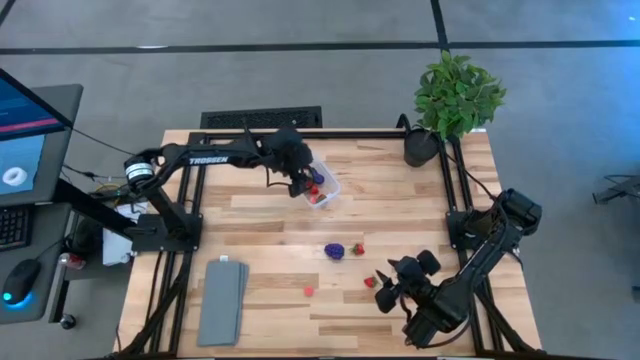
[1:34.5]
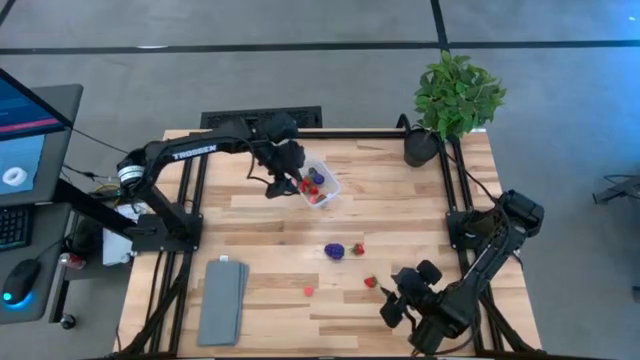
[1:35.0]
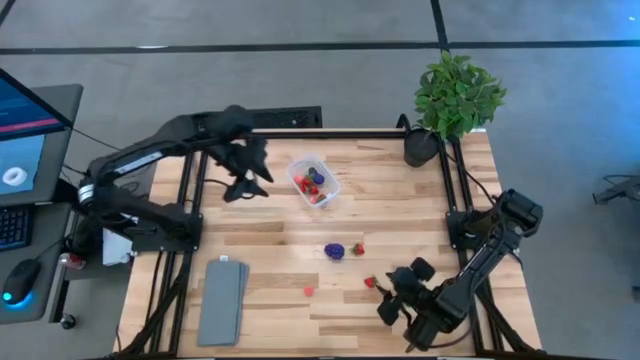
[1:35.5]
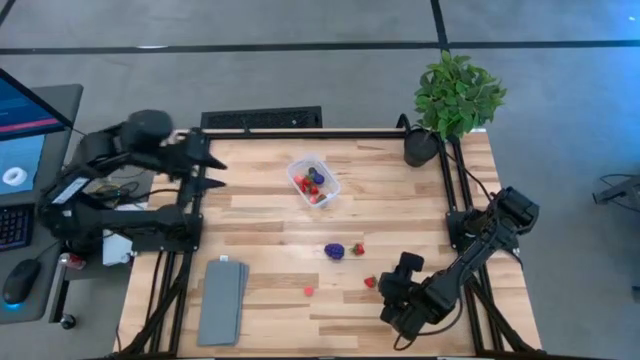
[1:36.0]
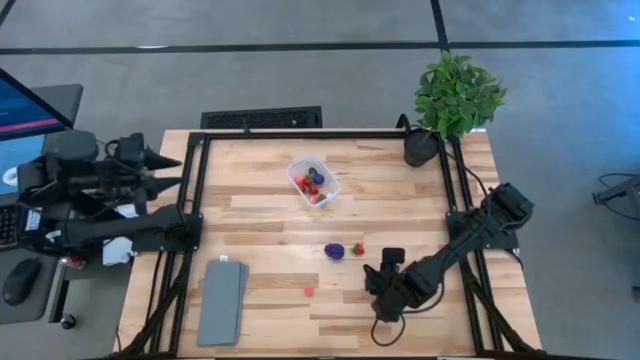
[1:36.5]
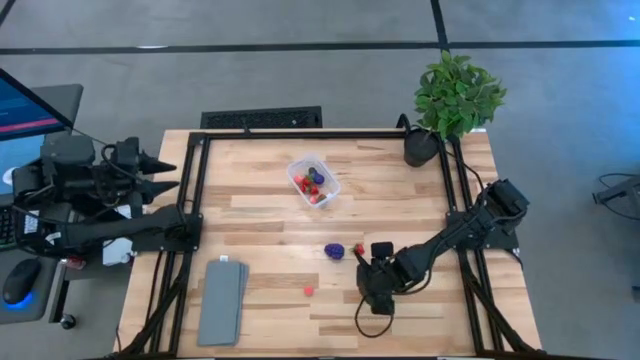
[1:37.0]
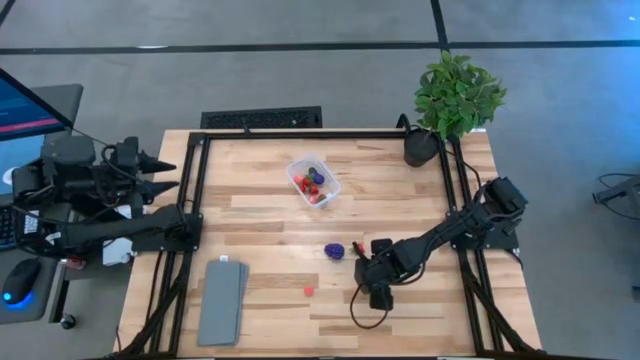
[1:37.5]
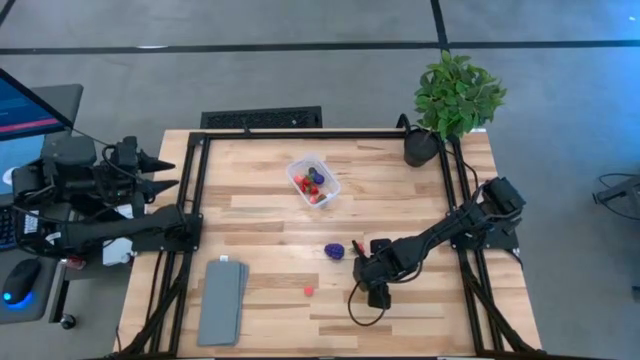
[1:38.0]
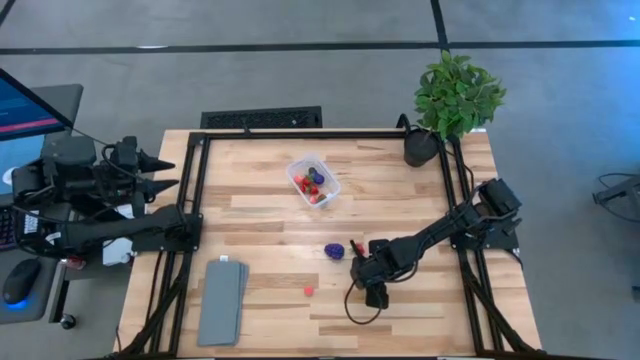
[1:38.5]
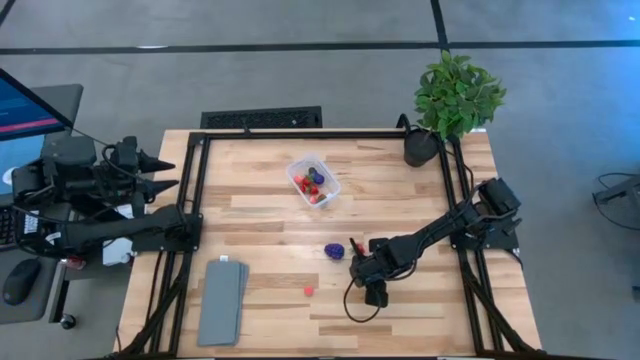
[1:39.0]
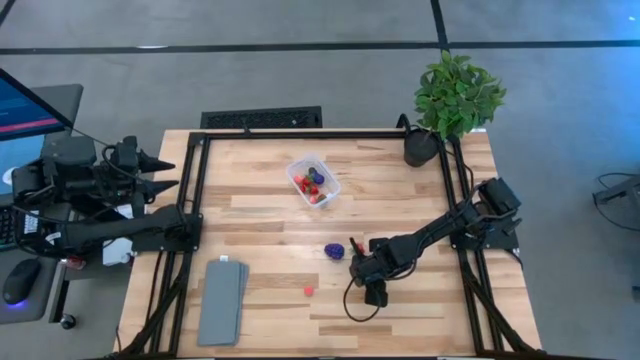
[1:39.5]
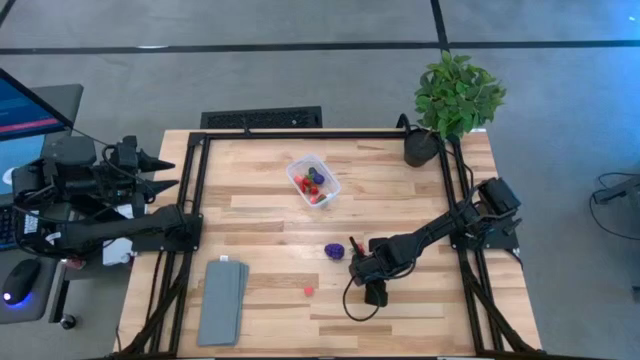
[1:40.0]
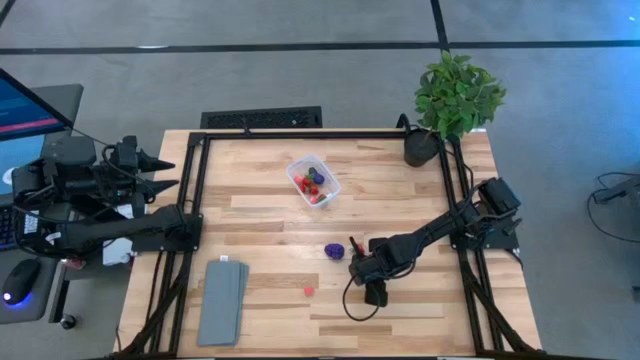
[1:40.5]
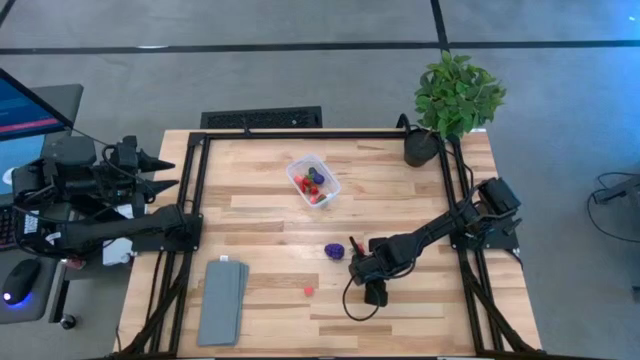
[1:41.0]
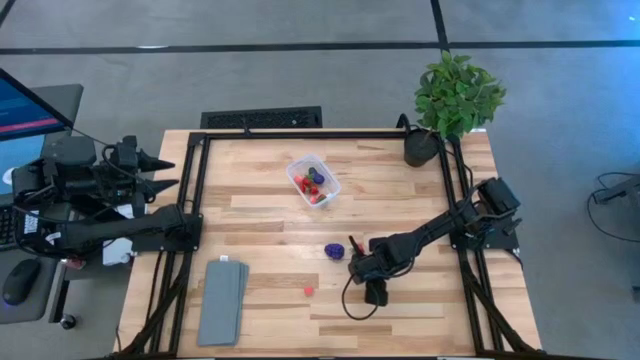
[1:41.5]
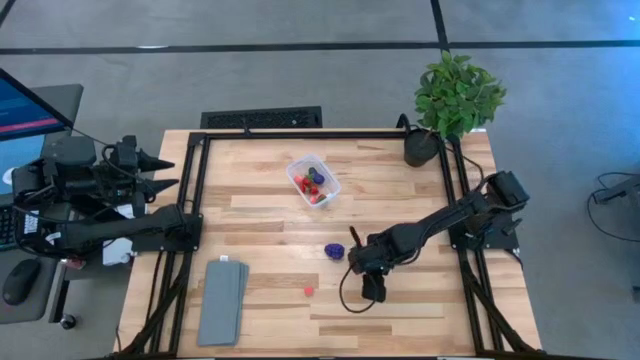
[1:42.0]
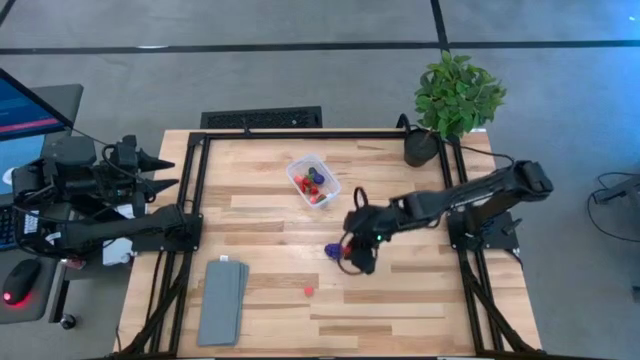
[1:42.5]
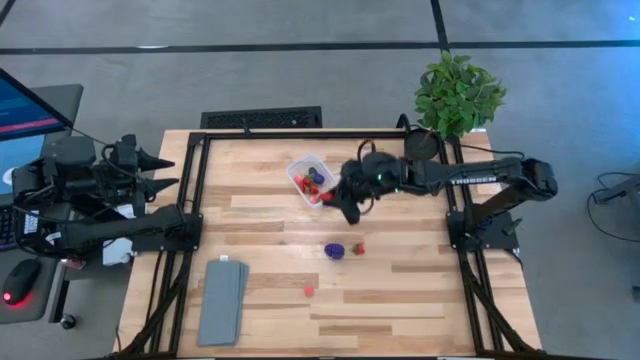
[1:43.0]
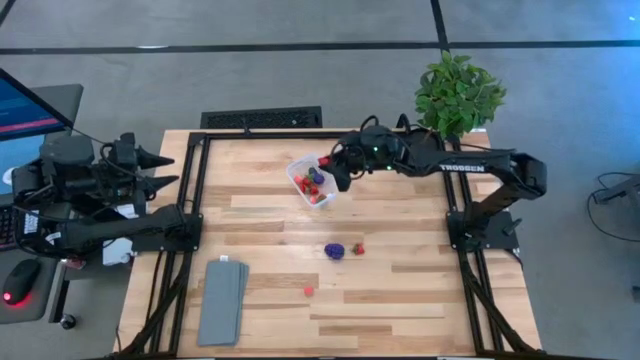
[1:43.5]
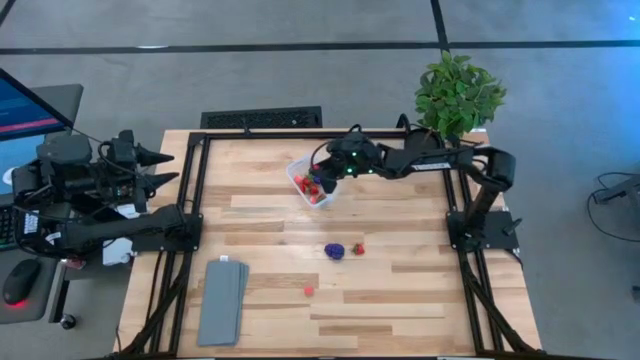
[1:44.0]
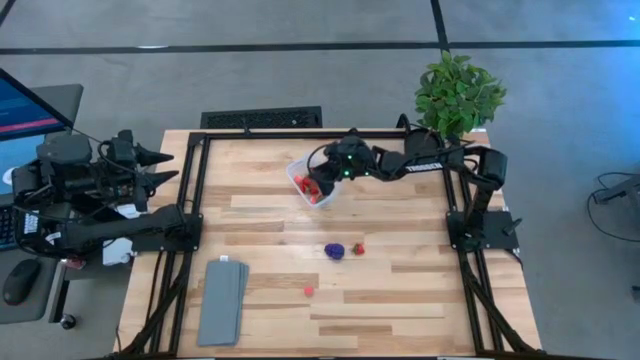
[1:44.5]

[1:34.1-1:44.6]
Task: Pick and placing Produce into tupperware
Put the strawberry into the transparent container

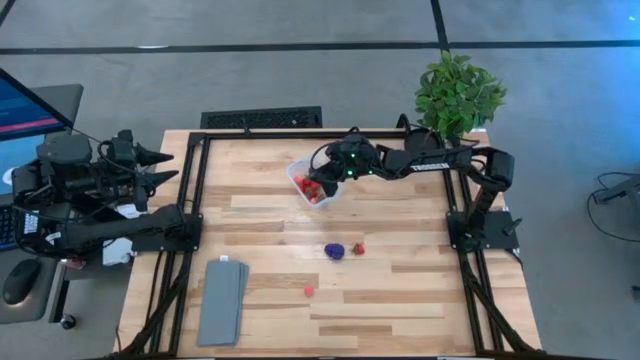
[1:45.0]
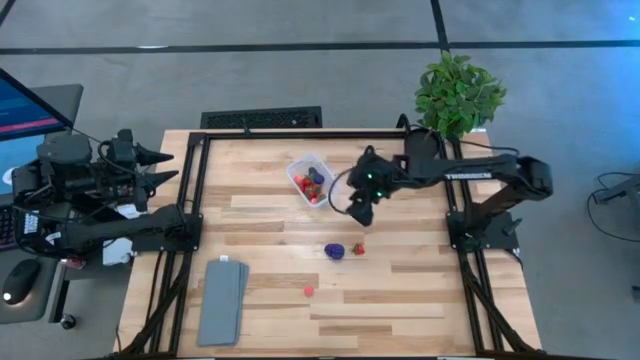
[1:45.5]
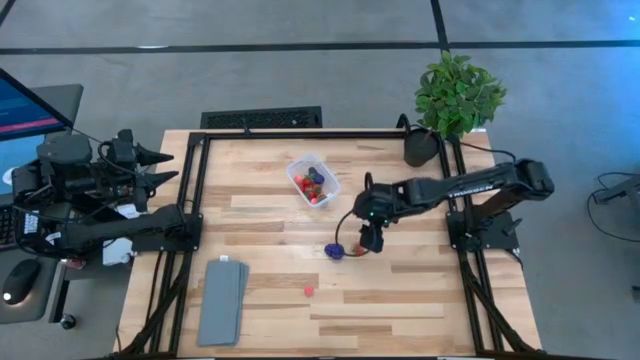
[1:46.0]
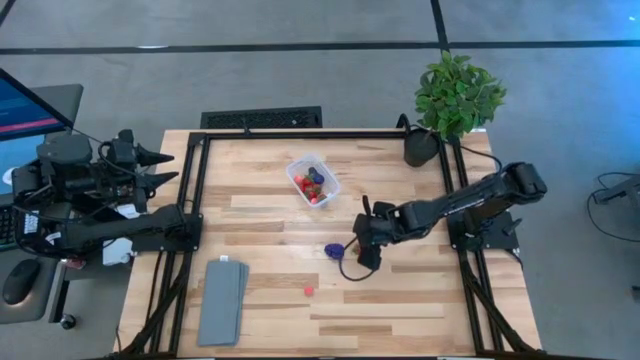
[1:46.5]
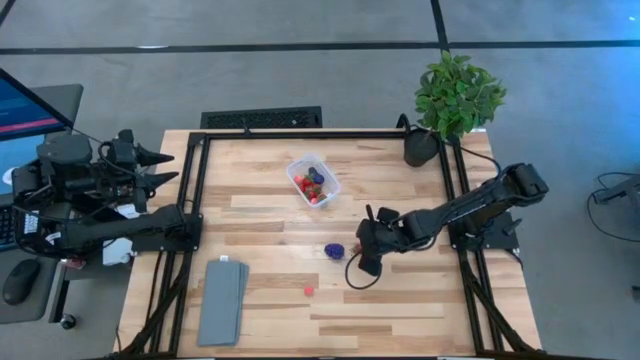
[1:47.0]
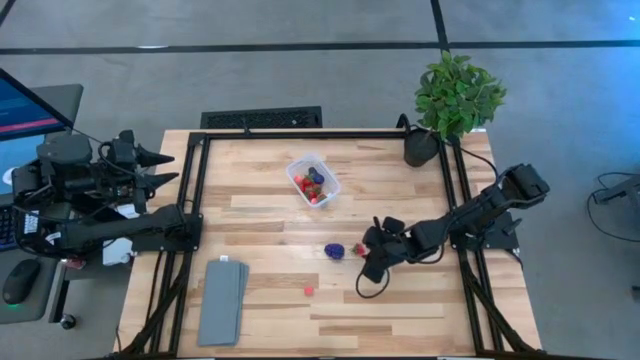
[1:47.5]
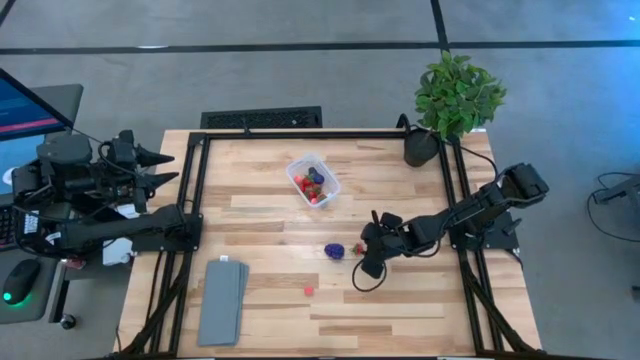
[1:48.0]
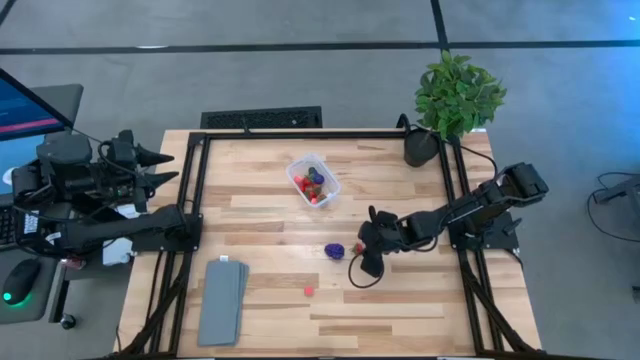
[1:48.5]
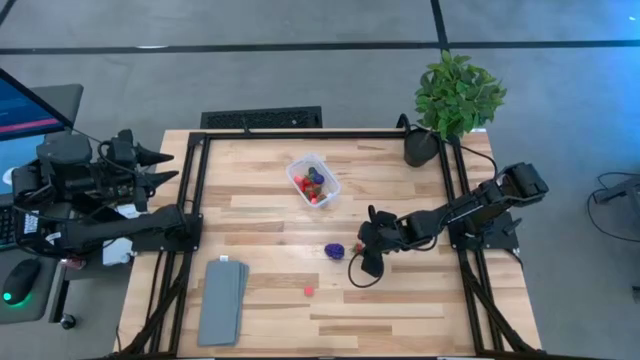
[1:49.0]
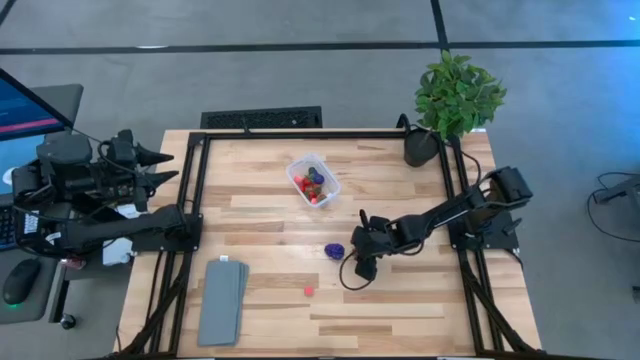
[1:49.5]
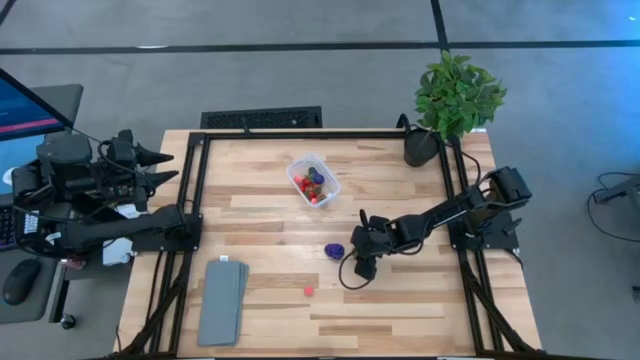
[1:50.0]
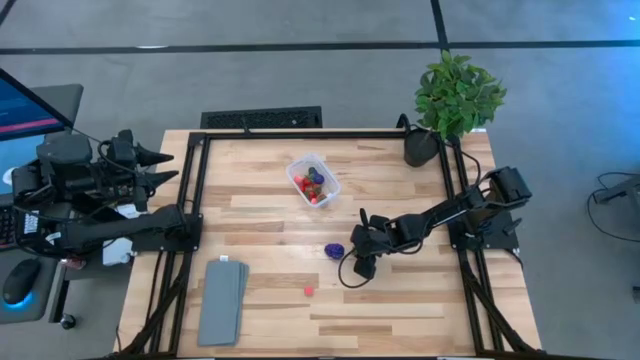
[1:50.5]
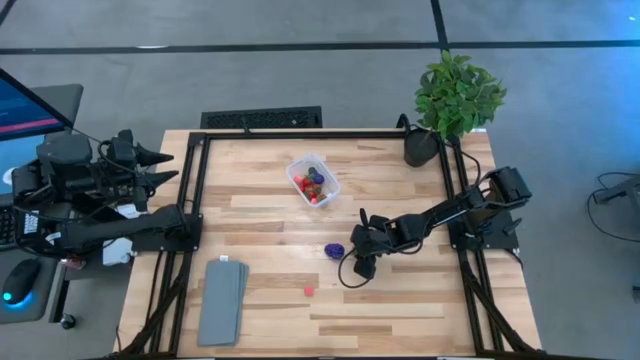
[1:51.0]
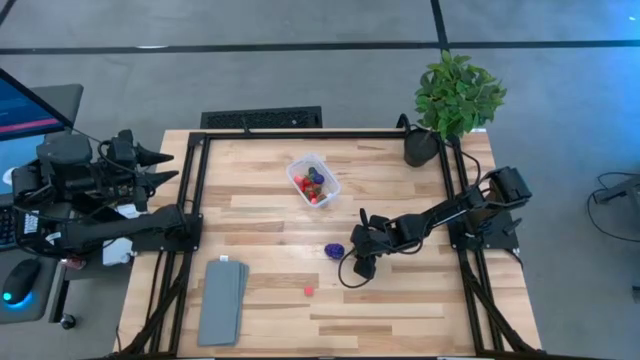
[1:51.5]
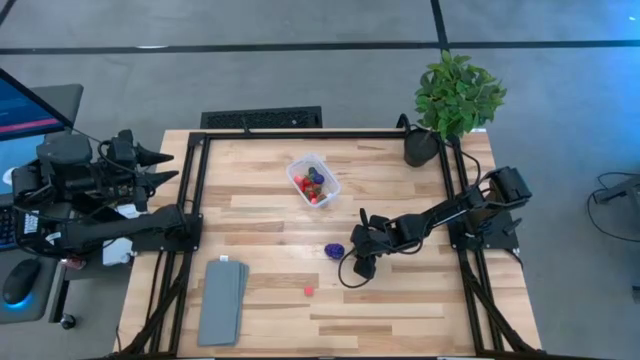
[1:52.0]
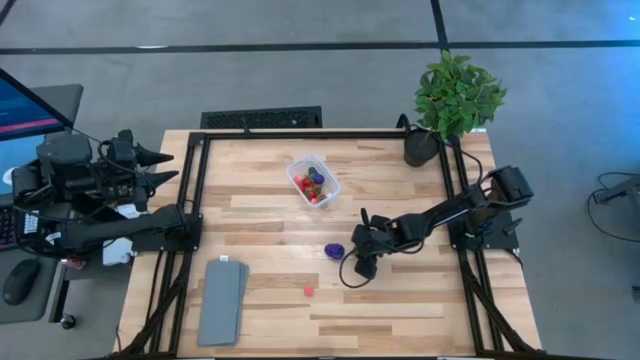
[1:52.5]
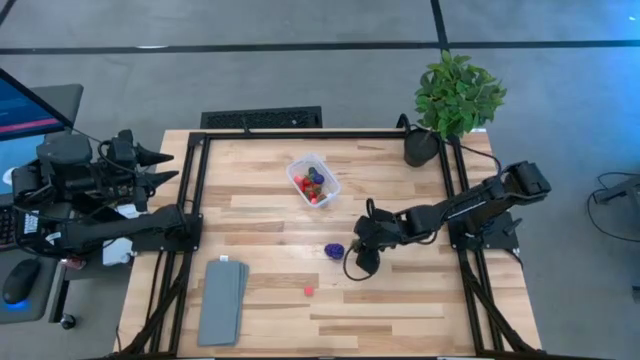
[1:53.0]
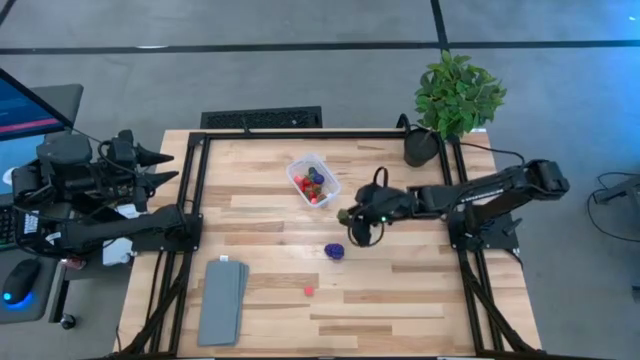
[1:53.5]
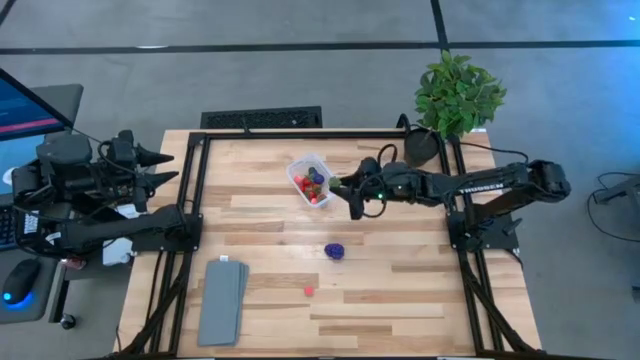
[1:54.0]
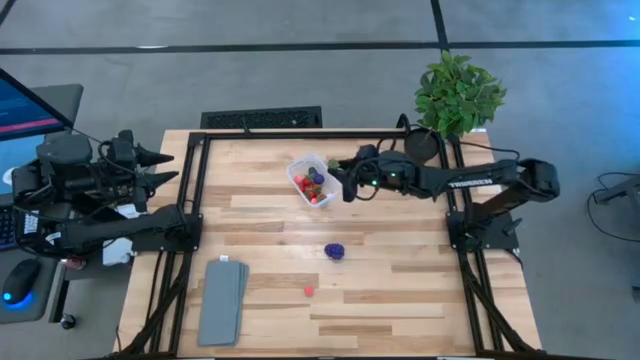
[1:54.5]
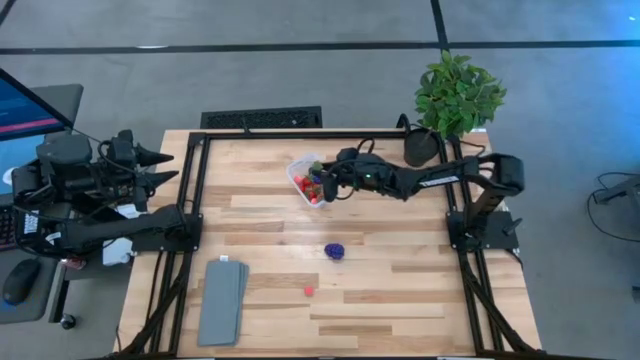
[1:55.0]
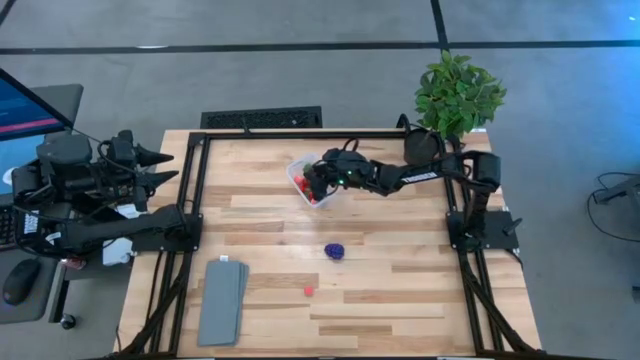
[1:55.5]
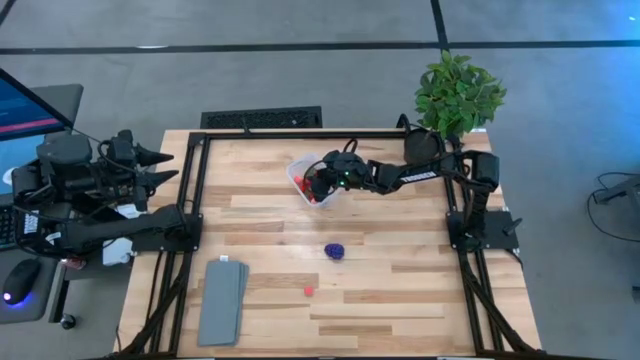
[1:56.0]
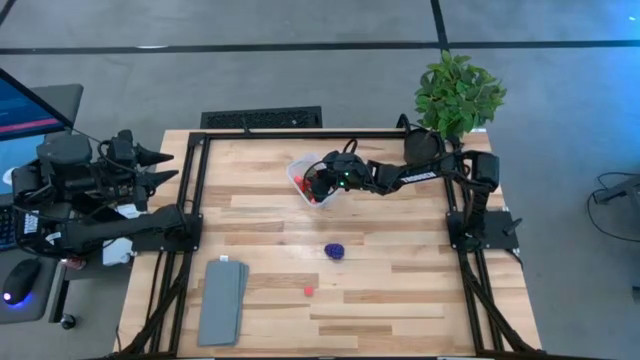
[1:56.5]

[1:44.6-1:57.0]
Put the strawberry into the transparent container
